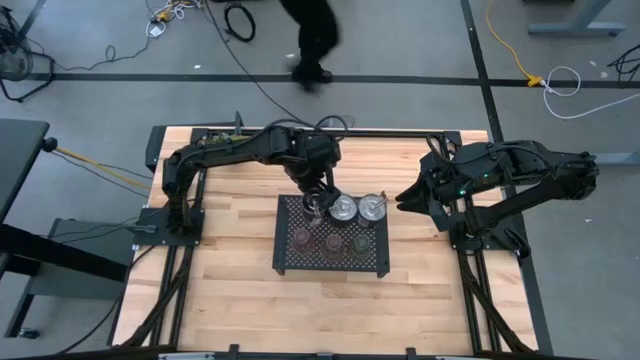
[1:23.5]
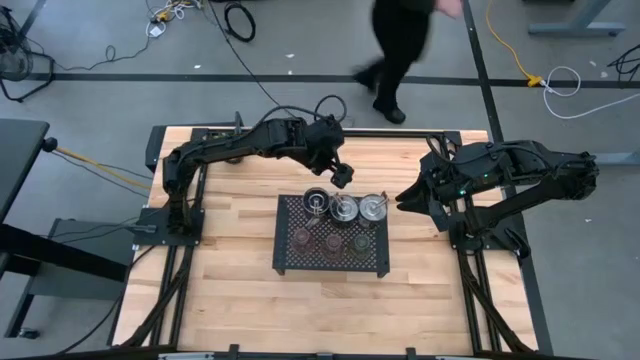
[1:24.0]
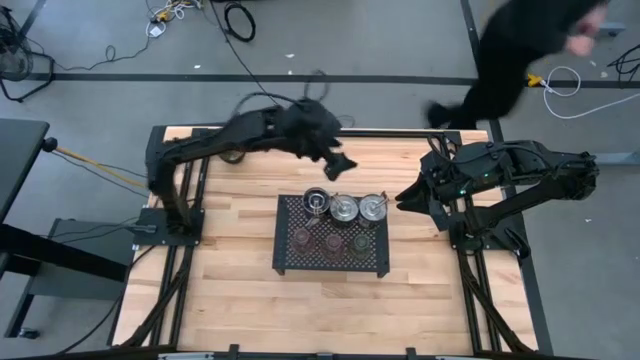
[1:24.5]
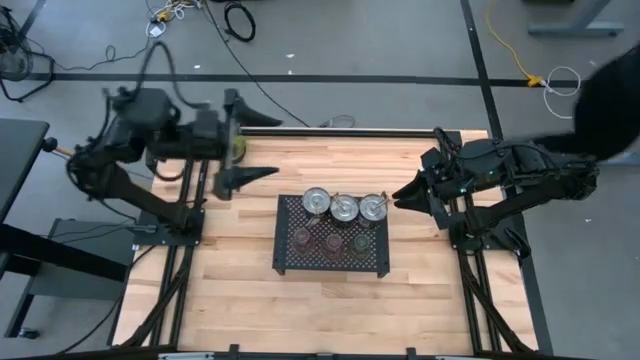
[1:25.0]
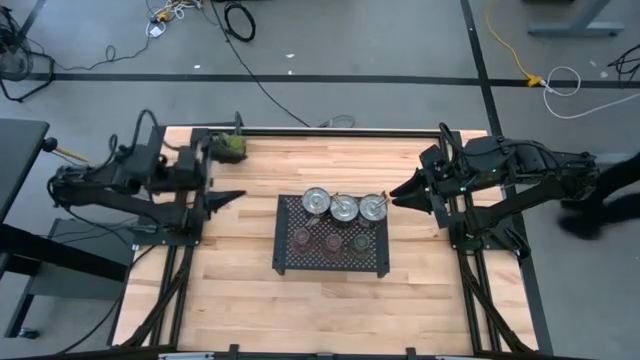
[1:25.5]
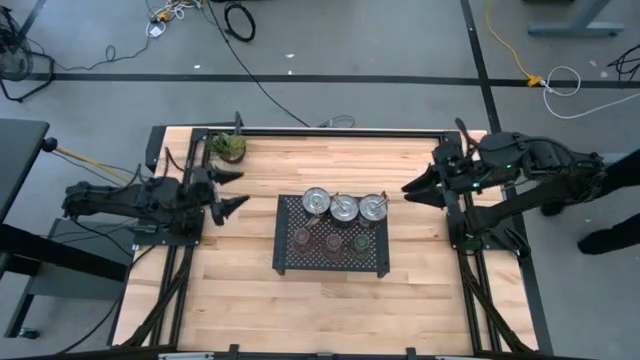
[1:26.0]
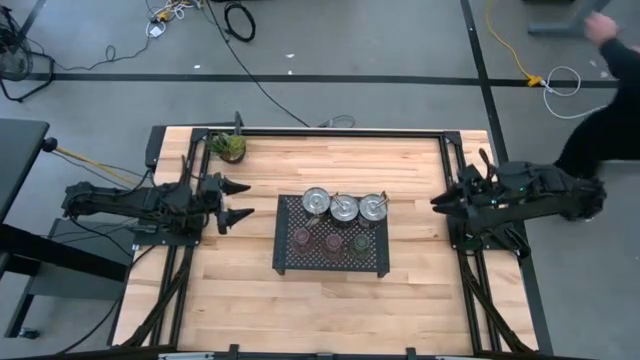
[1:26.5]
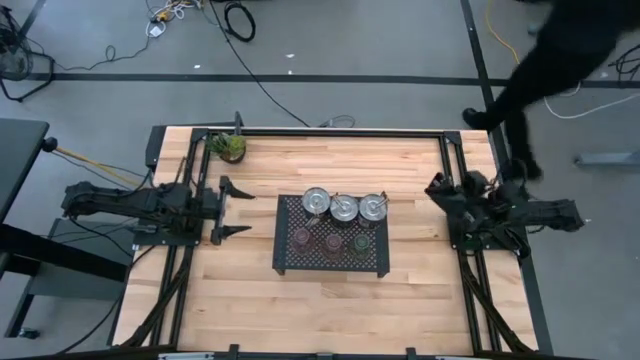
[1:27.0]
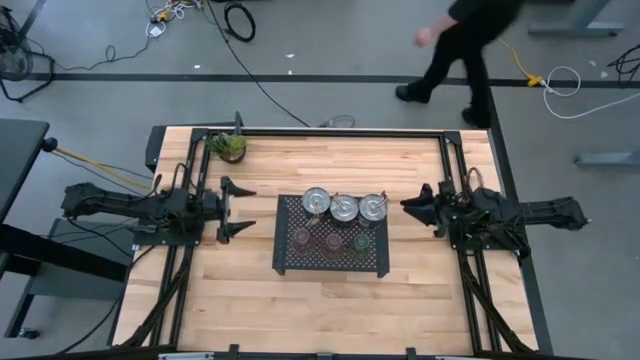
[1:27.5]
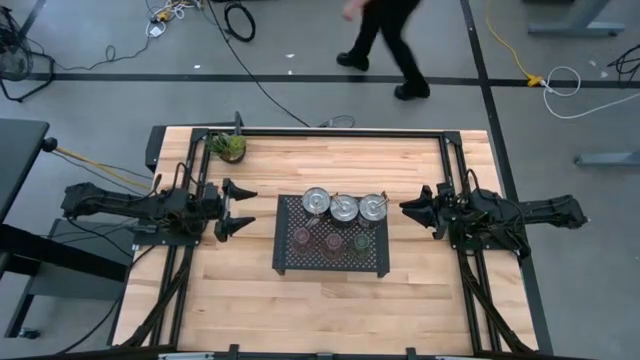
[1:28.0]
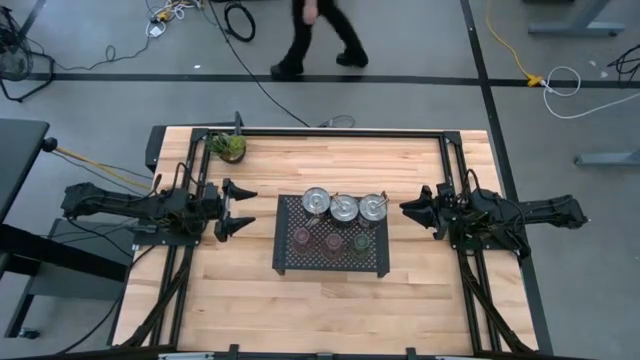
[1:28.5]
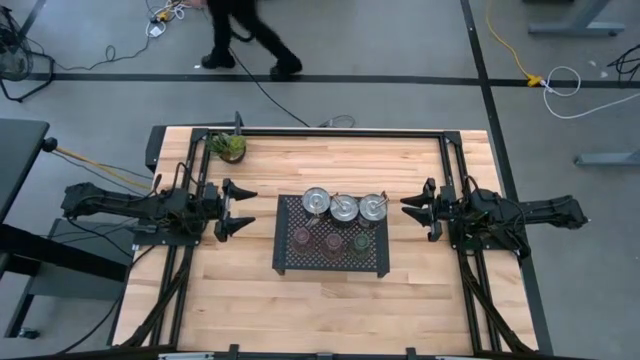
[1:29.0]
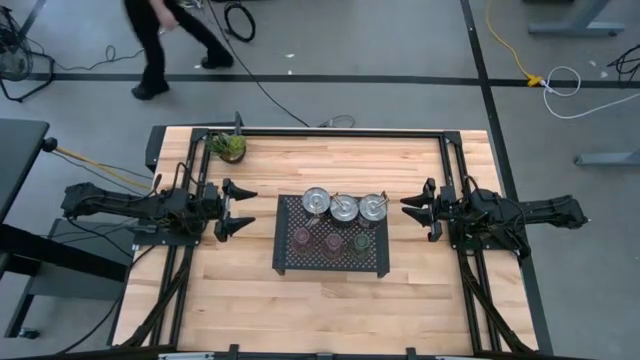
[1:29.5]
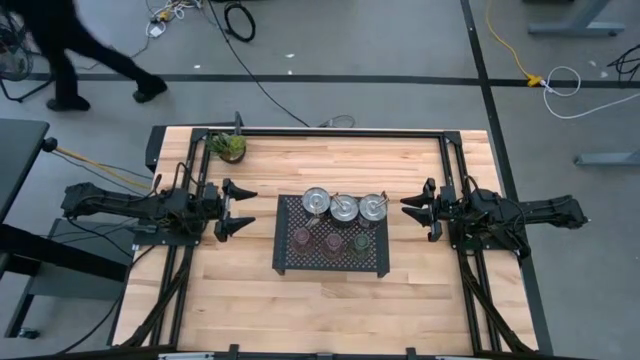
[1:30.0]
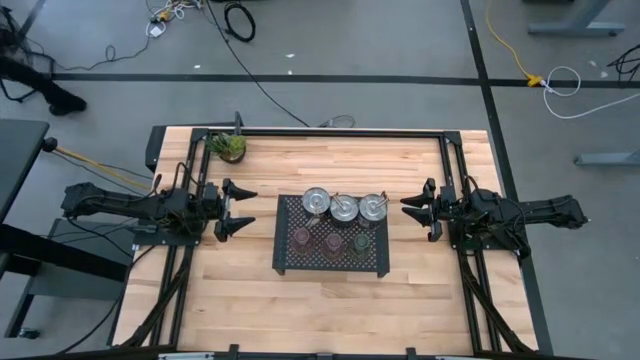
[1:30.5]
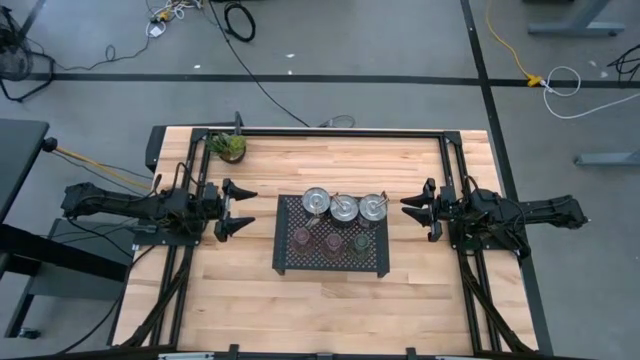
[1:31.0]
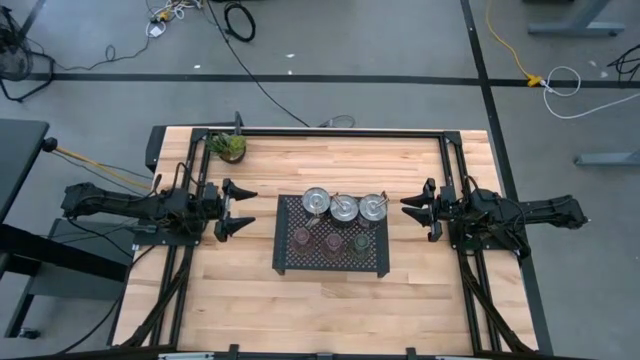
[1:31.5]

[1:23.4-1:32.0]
Task: Pick & Place candle stick holders
Return to Home Position

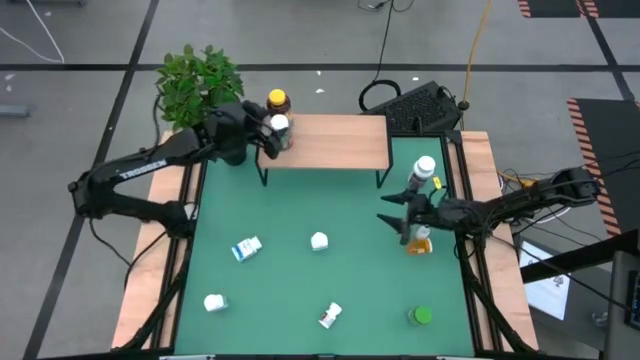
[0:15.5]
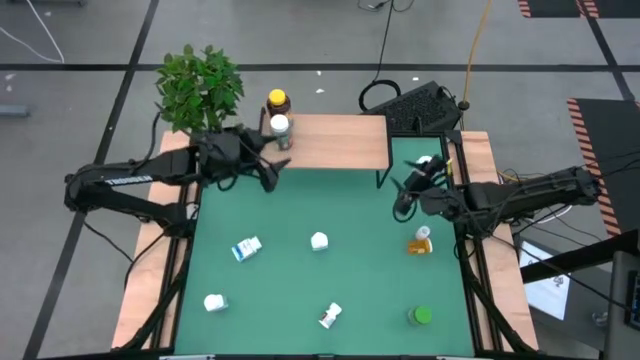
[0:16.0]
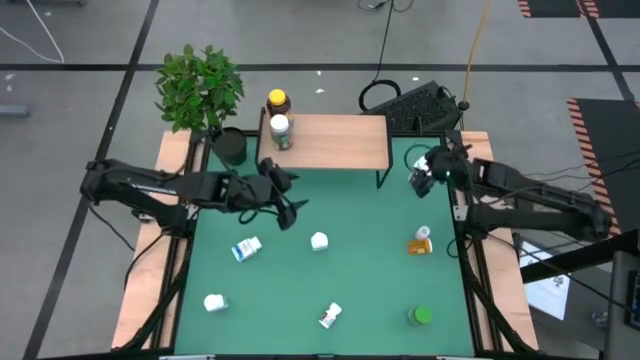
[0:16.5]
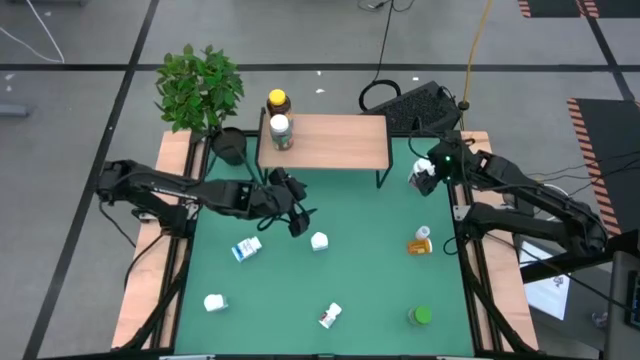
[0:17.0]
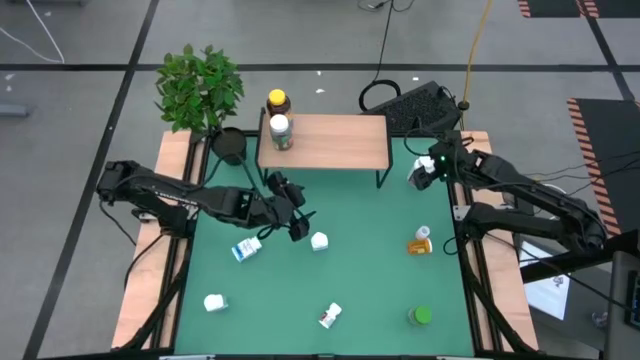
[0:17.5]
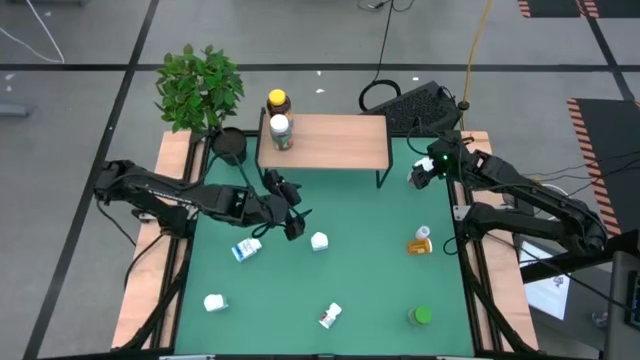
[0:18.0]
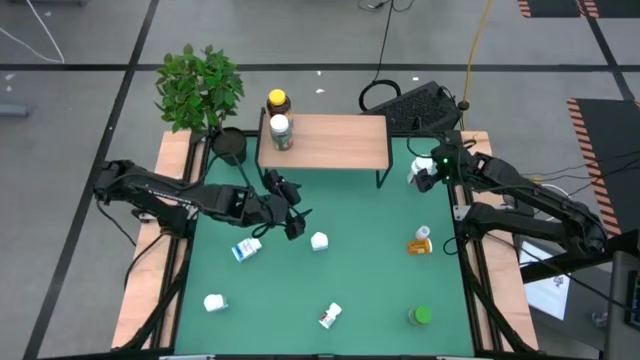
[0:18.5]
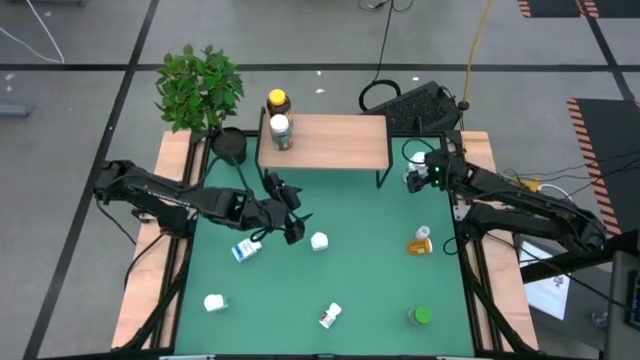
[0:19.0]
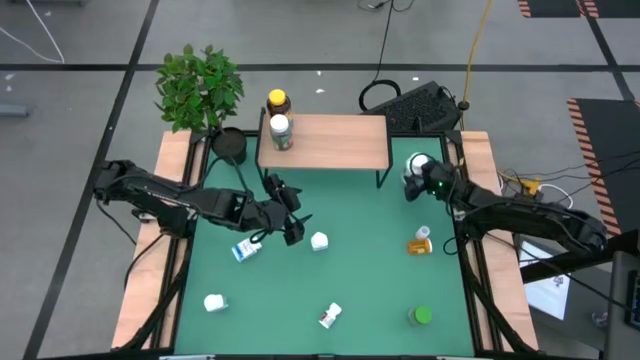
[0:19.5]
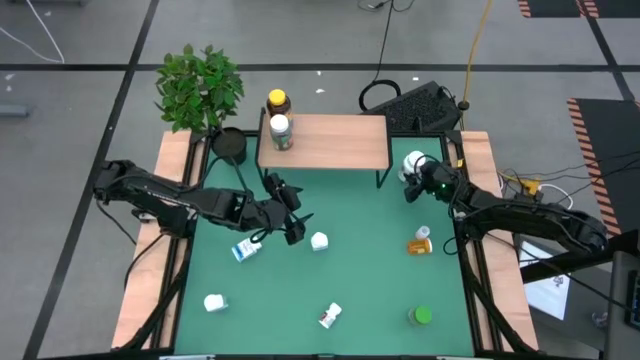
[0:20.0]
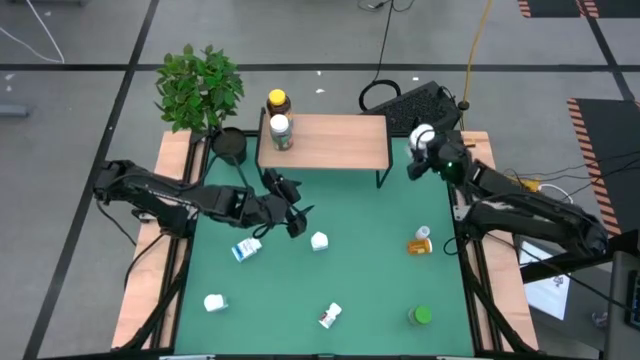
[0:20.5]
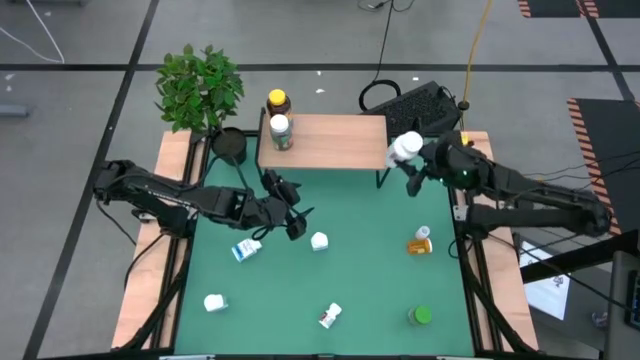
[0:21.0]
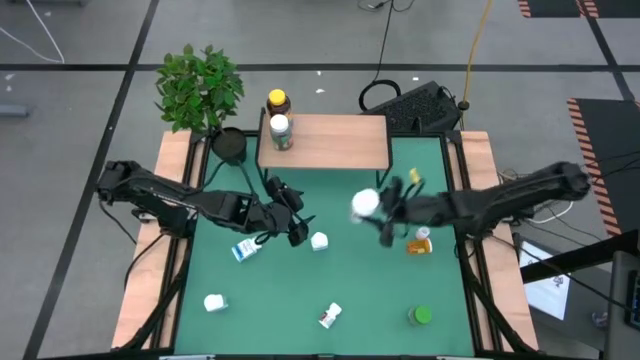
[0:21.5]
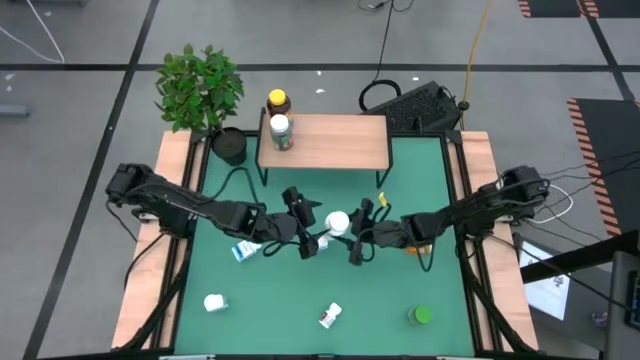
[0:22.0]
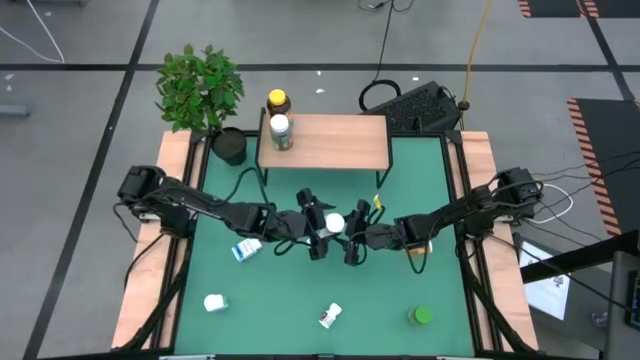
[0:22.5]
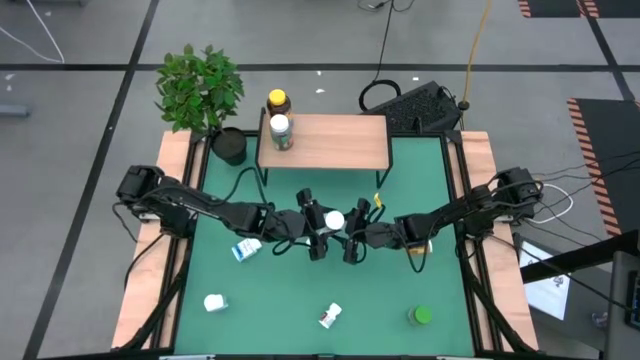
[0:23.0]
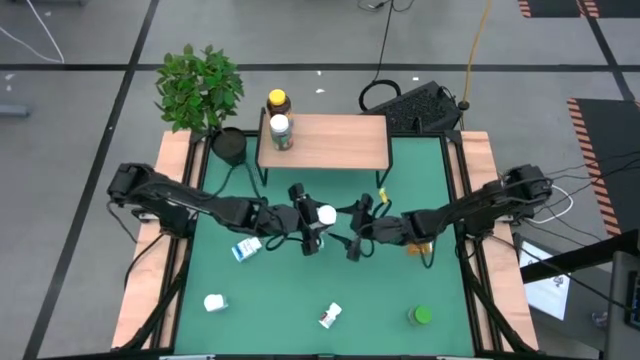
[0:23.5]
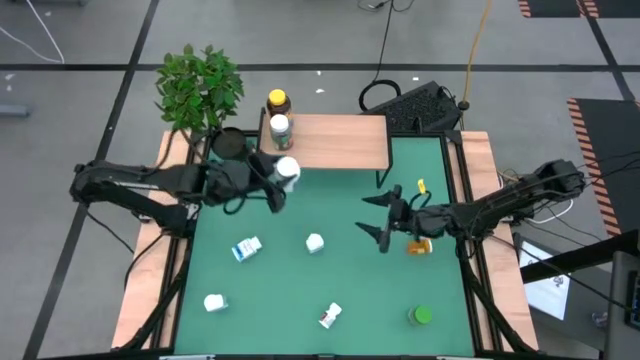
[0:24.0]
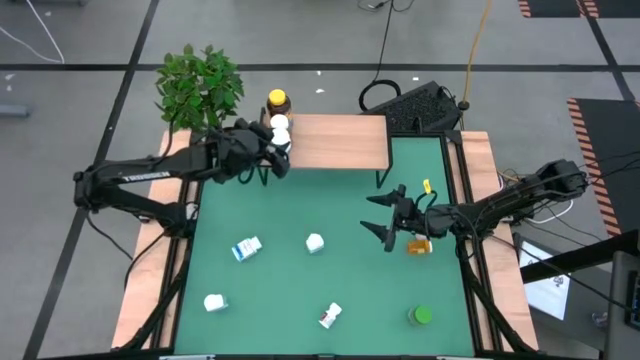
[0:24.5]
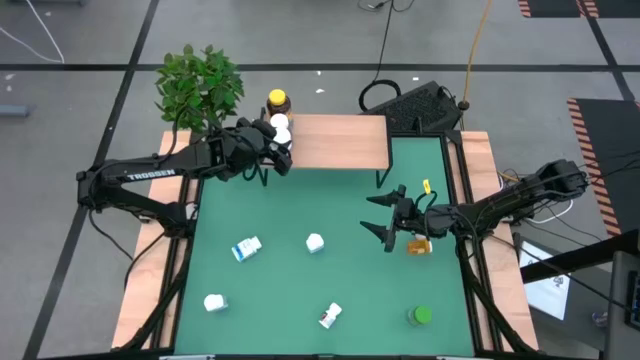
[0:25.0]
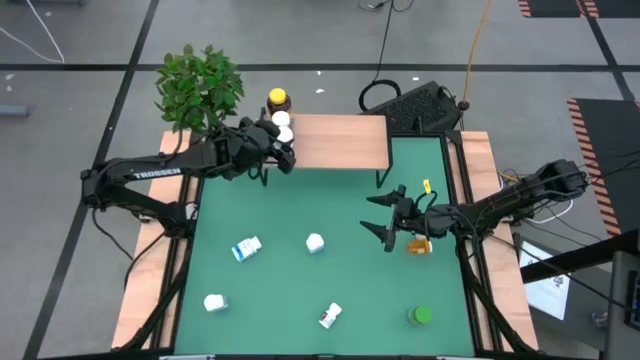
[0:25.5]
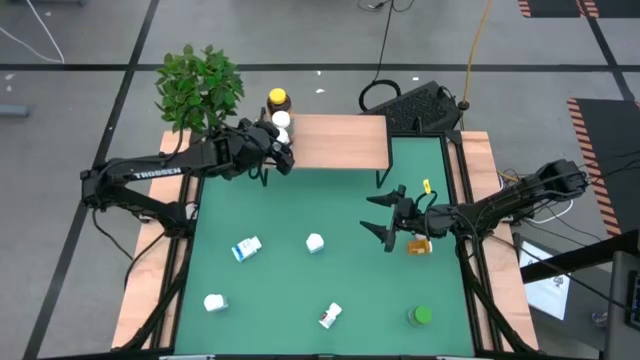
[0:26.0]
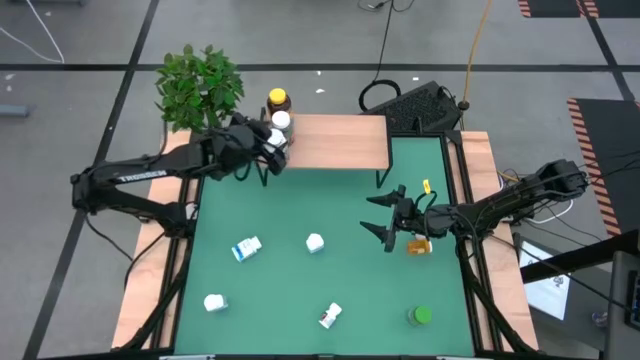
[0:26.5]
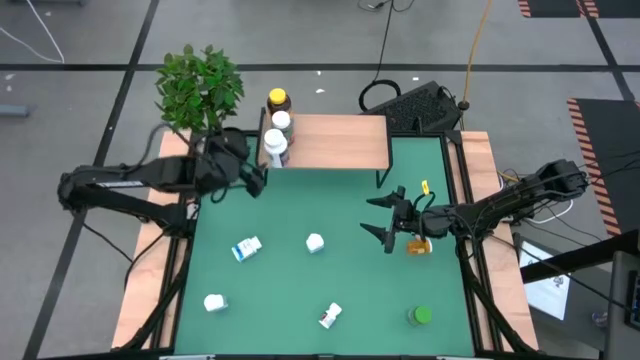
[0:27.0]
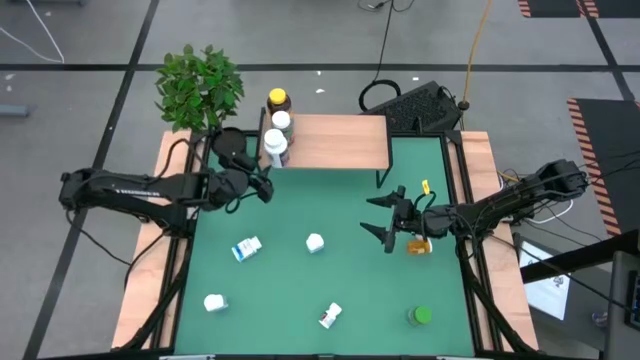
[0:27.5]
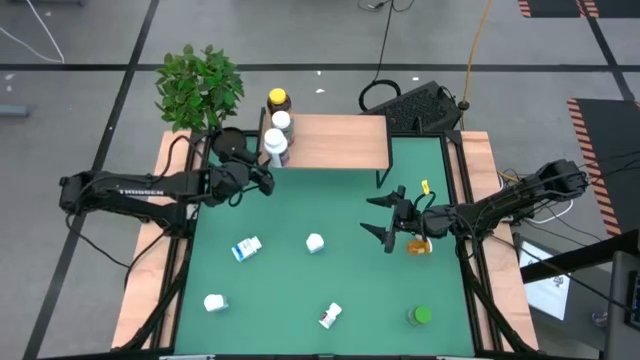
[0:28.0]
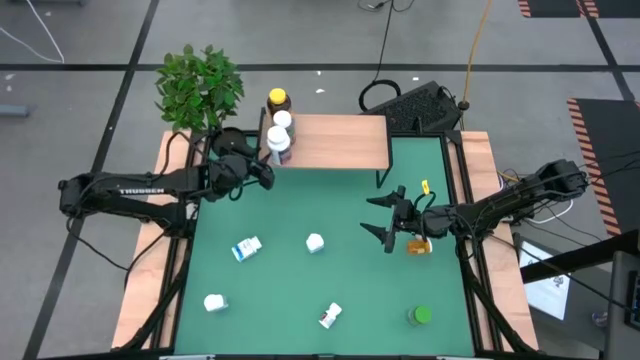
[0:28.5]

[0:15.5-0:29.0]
Task: Pick and place medicine bottles onto shelf by color
Put the violet medicine bottle on the shelf
